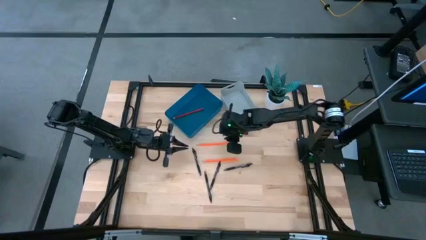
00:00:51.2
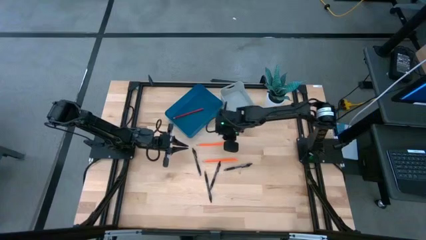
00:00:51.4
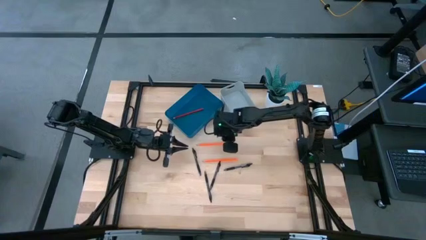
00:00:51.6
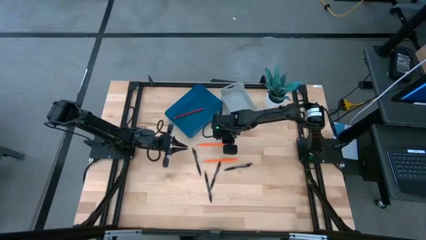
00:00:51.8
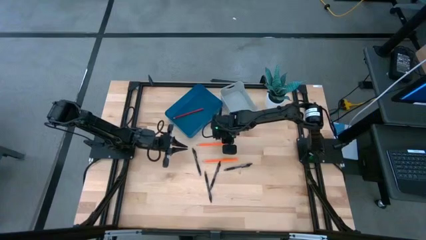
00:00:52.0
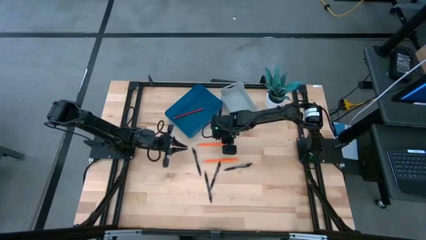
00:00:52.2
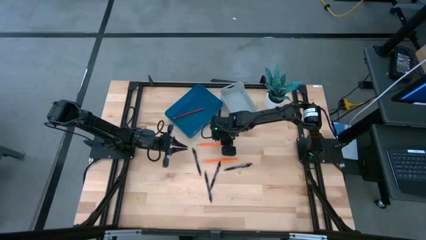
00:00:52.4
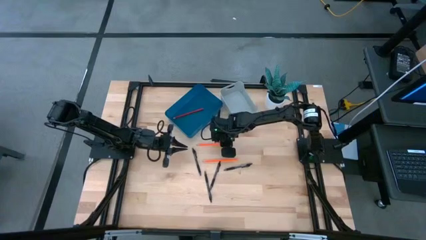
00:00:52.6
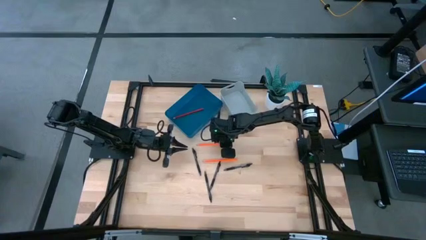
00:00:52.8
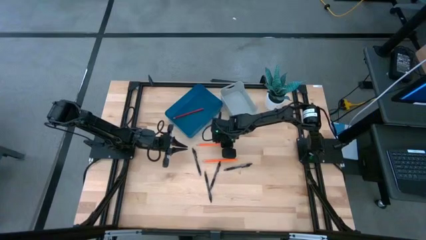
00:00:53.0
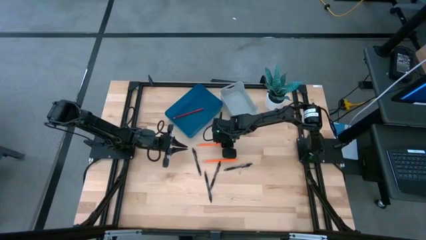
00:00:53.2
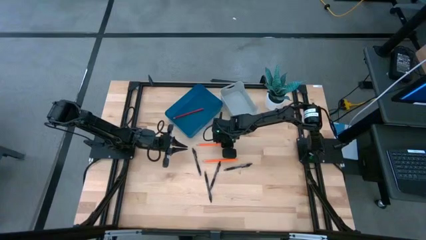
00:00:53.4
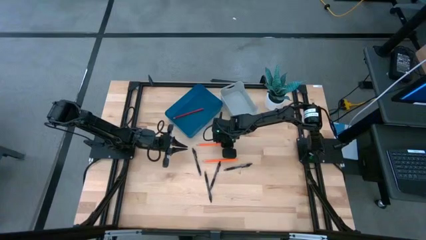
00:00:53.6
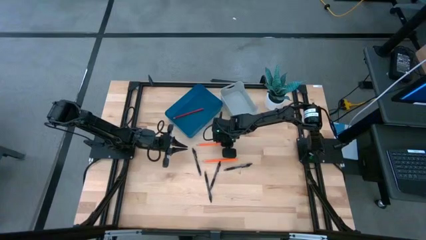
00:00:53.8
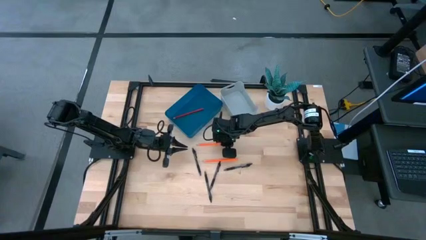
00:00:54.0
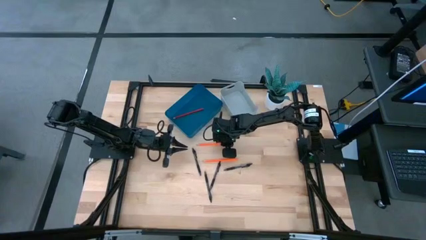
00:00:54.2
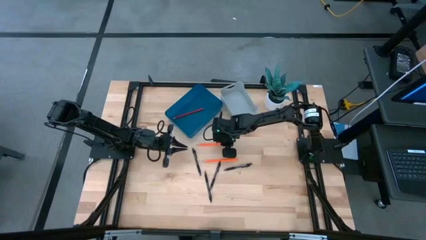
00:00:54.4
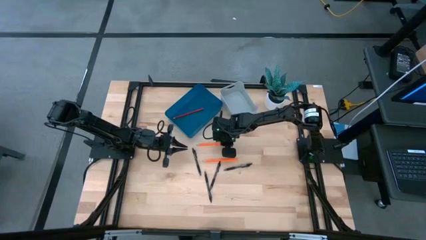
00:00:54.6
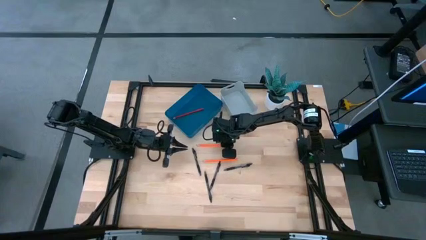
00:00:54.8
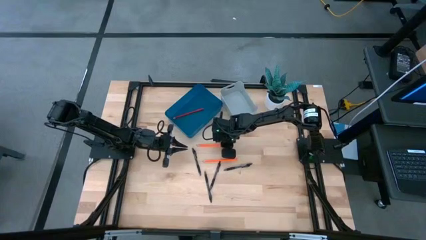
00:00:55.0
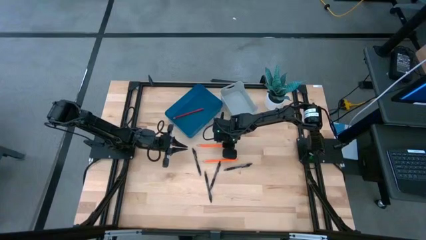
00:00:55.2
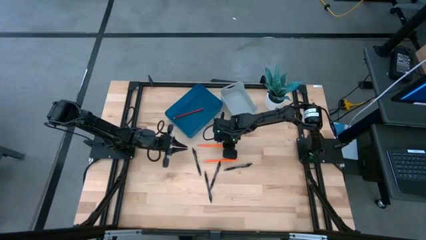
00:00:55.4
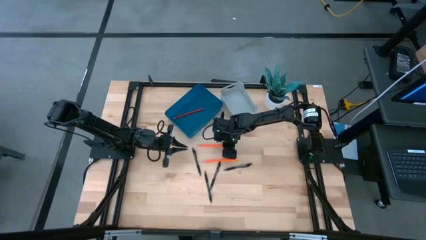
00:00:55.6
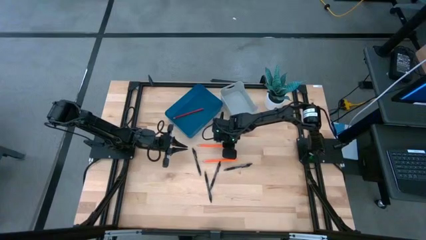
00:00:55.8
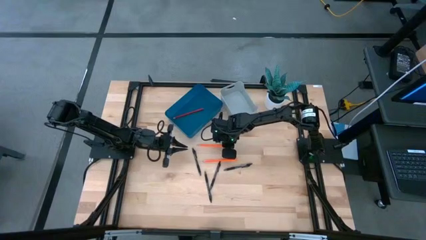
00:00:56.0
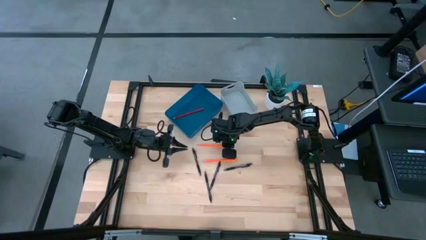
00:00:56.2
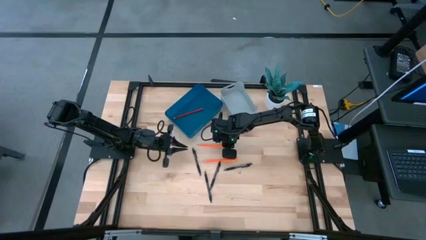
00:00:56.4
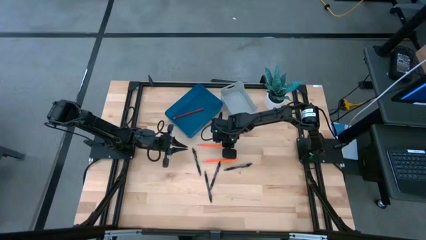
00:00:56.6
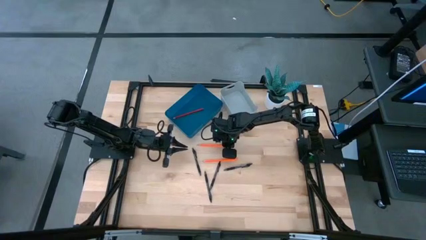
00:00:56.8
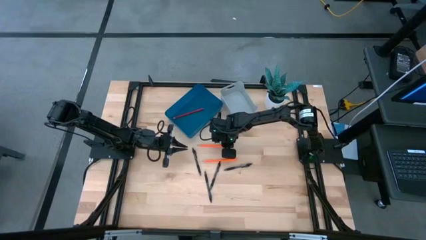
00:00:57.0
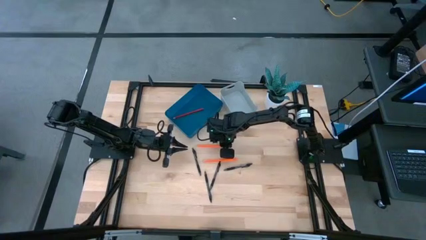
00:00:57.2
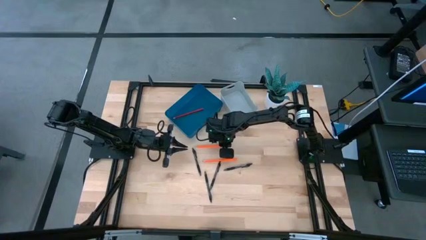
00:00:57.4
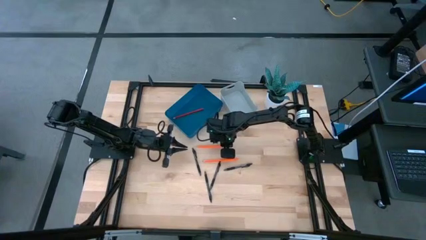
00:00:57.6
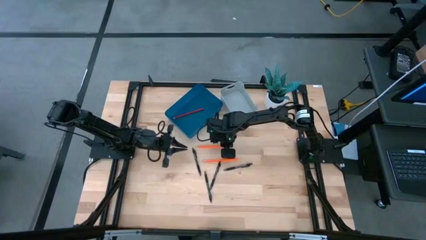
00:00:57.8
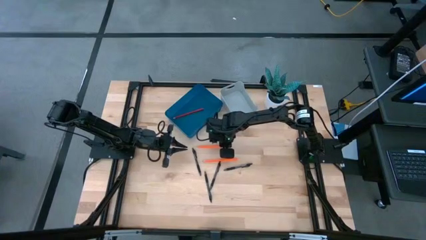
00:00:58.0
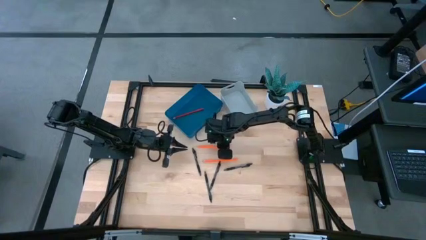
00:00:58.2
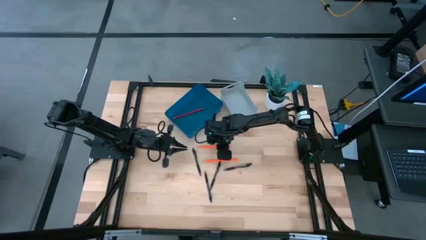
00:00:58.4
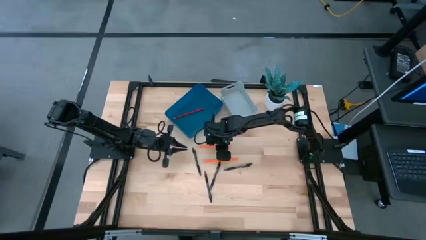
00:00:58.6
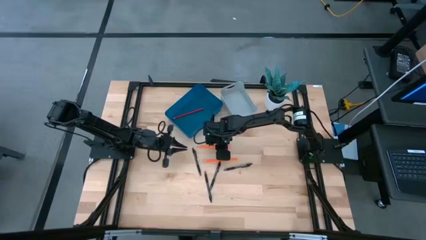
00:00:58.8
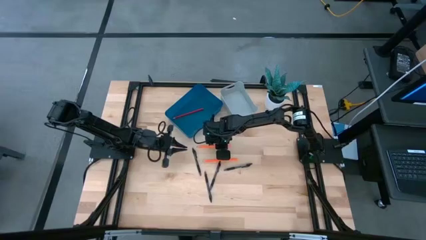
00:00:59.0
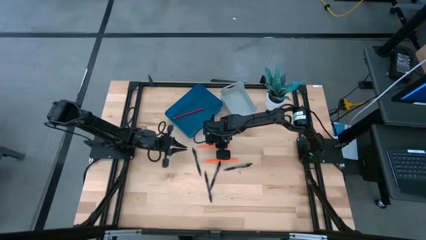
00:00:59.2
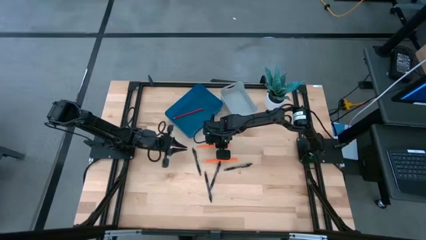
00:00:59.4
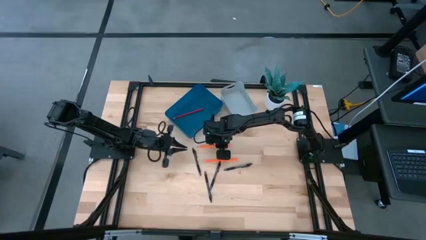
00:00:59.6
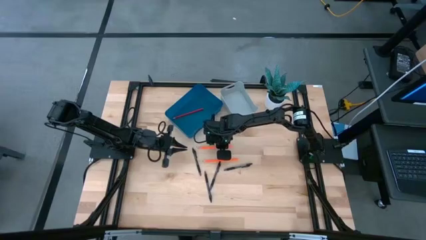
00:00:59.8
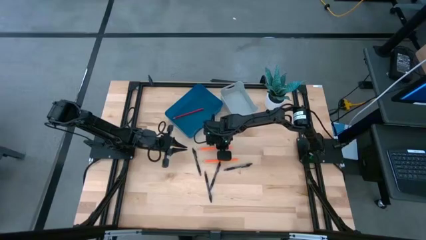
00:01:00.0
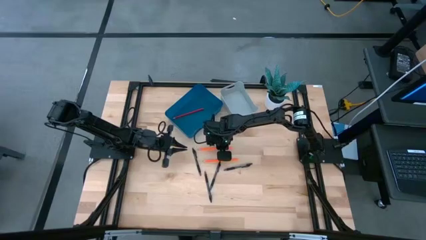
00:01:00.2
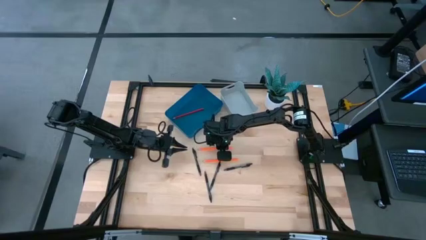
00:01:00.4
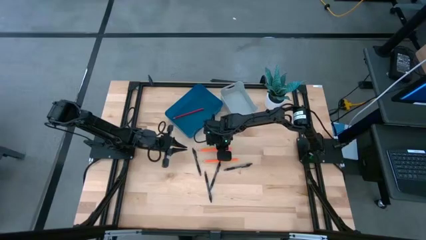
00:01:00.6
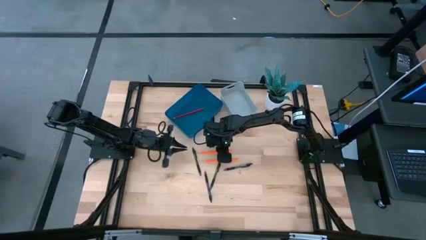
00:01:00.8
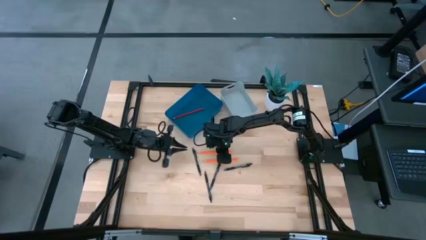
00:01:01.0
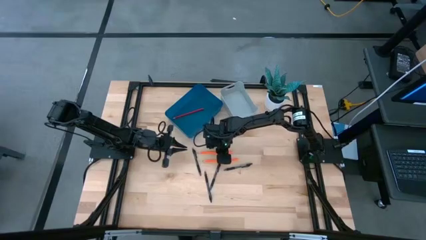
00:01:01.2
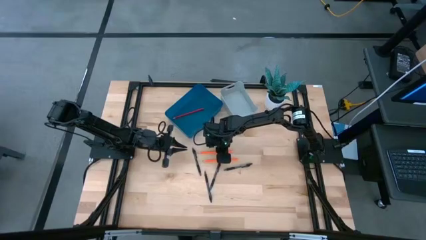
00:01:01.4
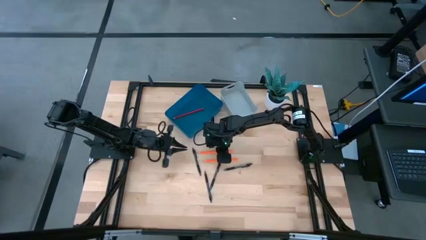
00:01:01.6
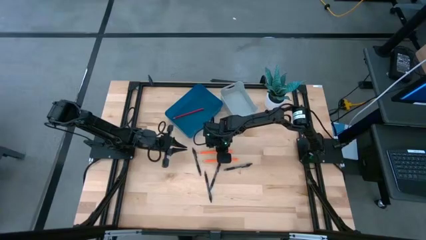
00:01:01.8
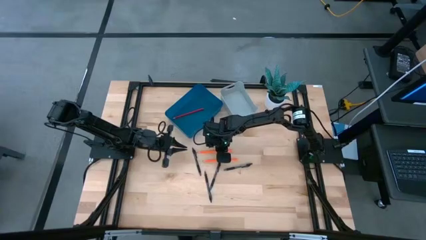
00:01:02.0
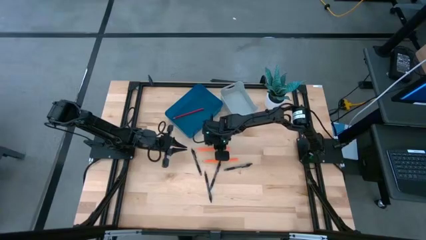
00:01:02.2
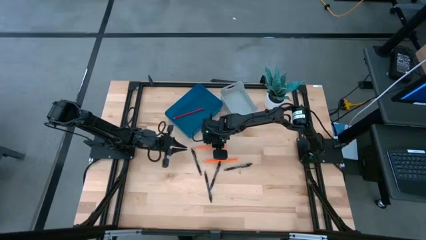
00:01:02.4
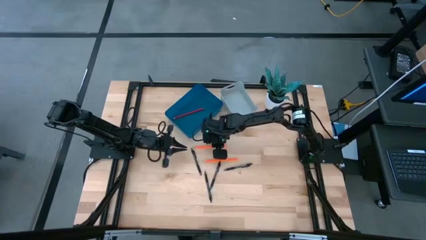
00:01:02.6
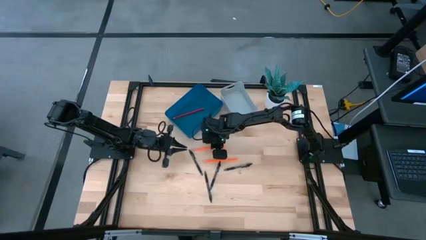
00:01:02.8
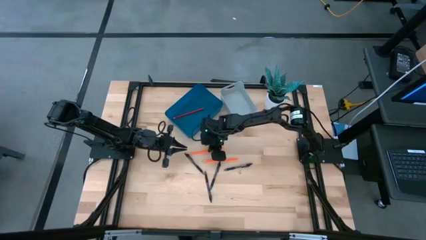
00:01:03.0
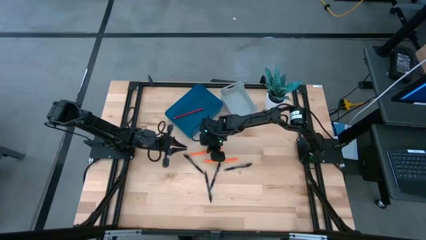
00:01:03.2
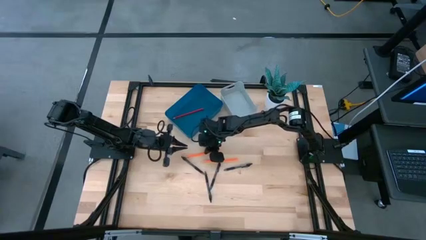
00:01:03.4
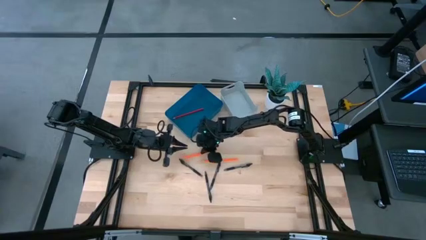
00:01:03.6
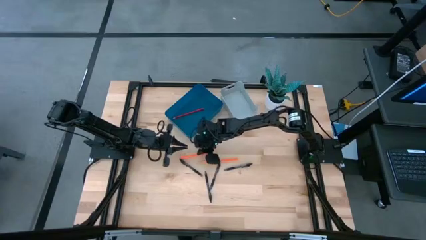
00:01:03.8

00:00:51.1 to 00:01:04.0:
Task: Sort pens & pencils
Put the orange pencil into the blue bin

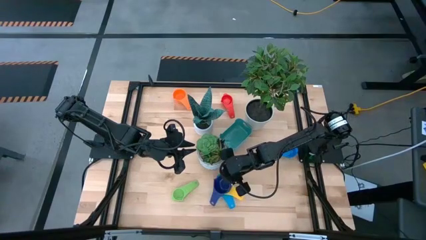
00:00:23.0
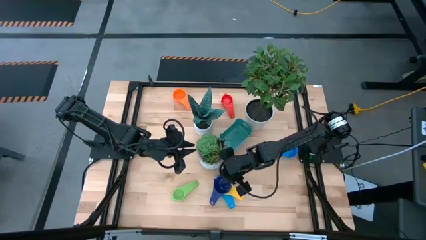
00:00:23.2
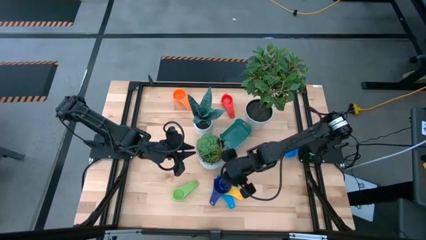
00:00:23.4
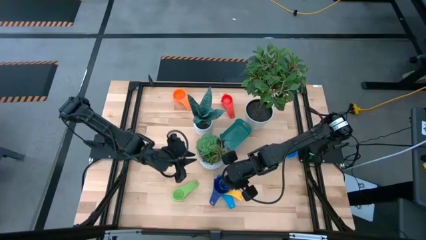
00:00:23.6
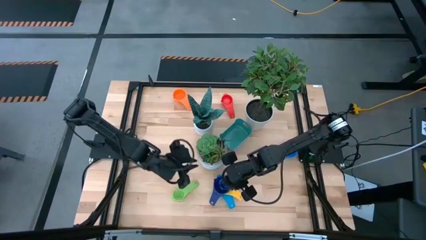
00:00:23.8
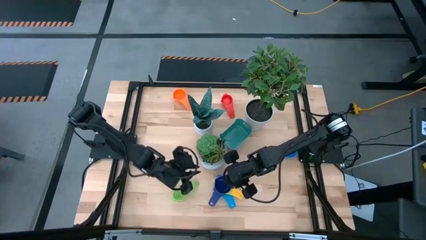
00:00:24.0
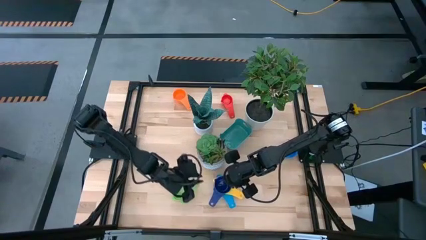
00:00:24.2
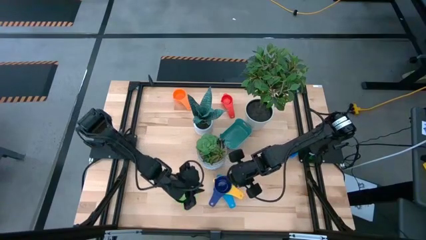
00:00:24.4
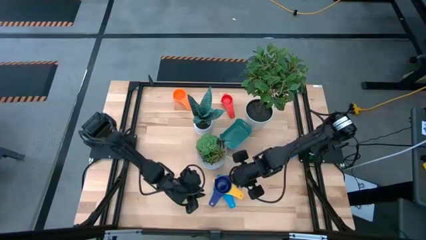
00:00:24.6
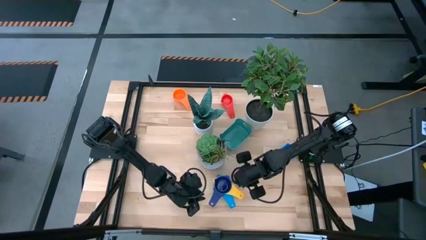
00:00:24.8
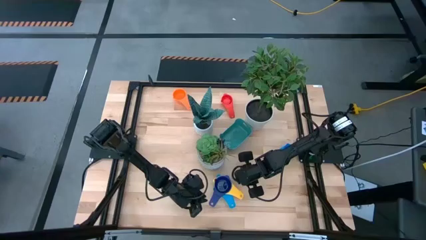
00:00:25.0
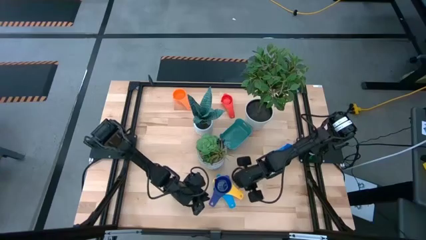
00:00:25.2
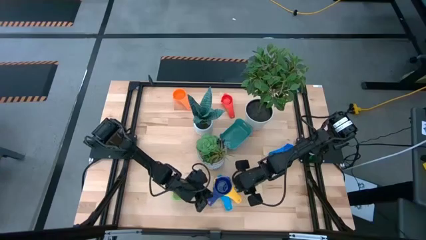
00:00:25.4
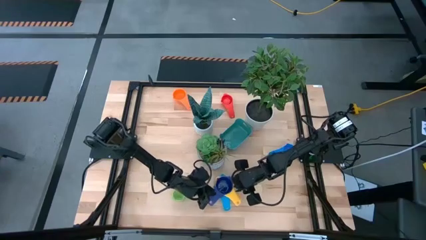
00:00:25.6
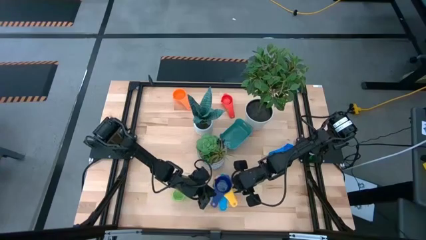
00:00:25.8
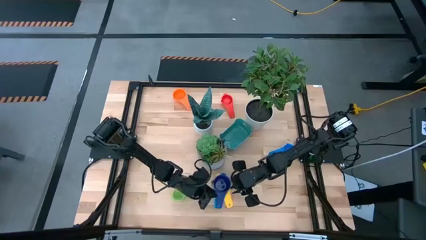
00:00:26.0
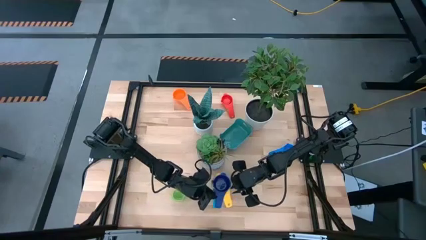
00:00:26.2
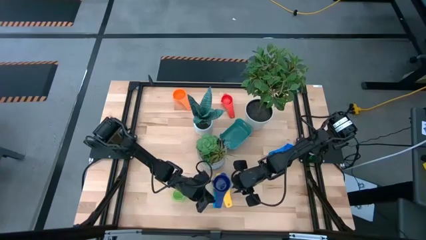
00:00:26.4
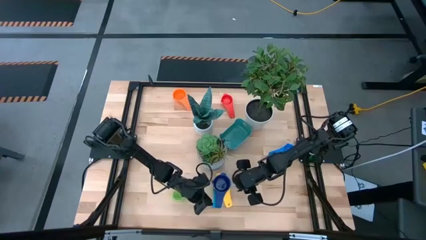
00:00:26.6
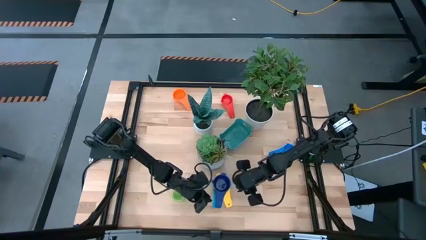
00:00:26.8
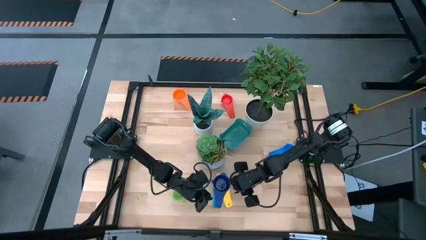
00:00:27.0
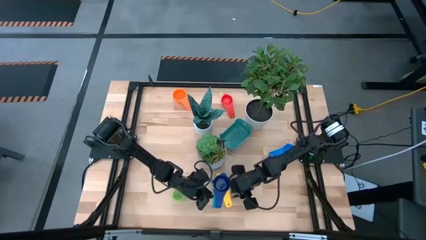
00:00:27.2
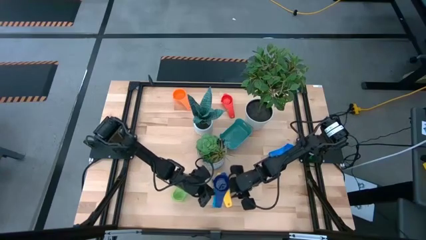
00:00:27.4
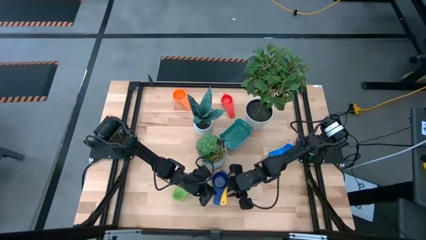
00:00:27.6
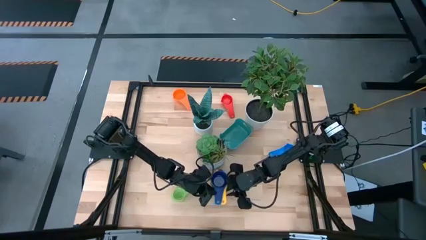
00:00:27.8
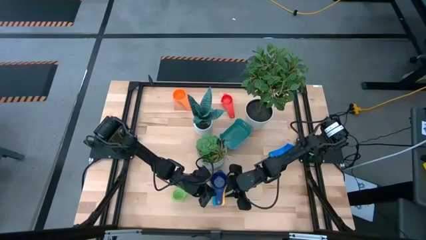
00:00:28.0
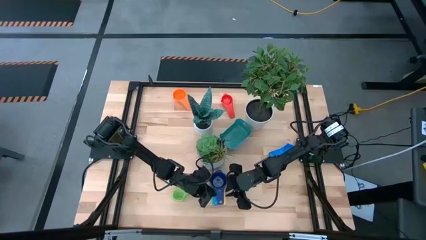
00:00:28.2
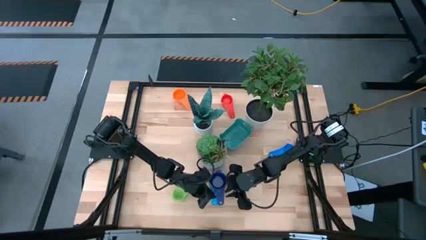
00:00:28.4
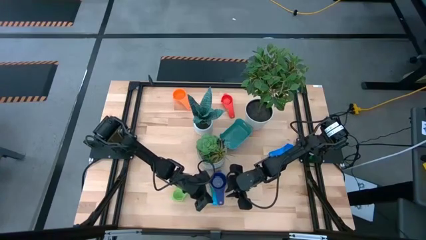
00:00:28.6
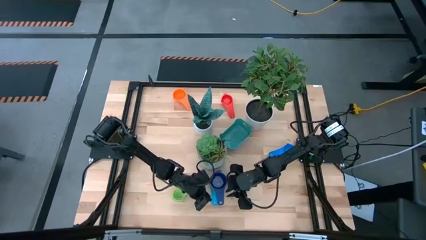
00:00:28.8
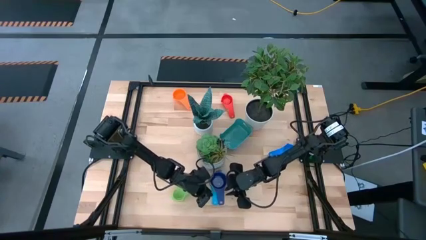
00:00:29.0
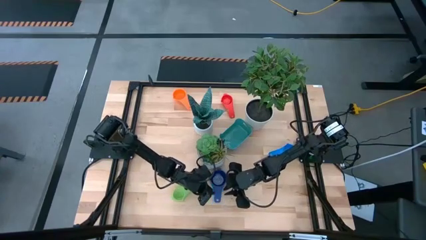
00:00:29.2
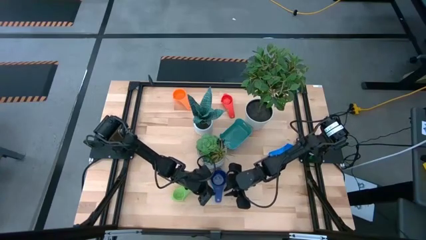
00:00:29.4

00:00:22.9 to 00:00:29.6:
Task: Nest measuring cups in basket
Adjust the stacked measuring cups
